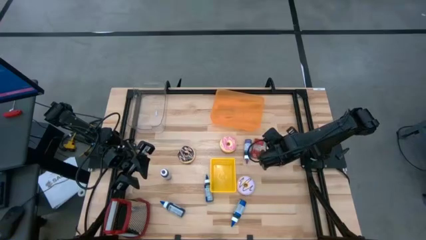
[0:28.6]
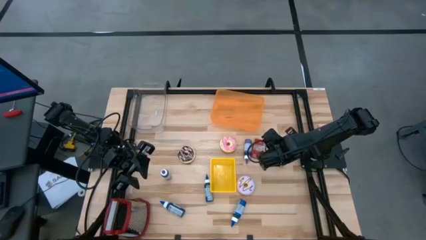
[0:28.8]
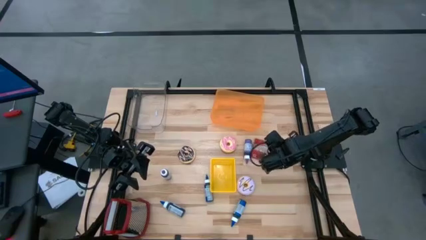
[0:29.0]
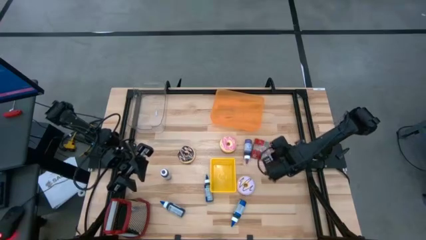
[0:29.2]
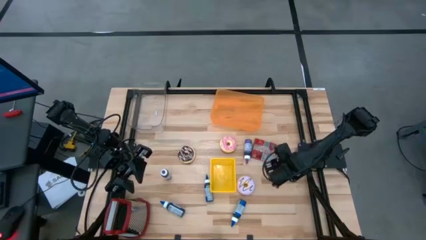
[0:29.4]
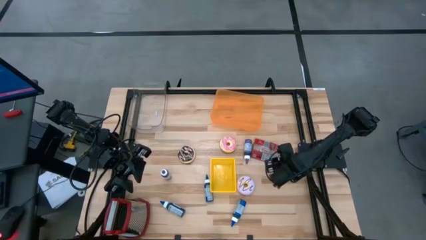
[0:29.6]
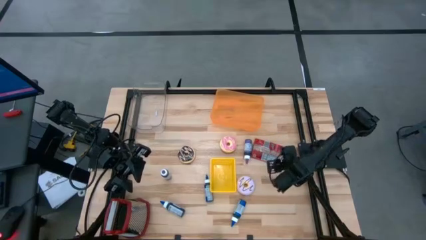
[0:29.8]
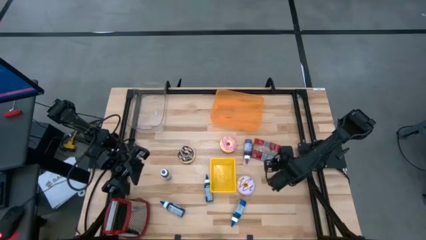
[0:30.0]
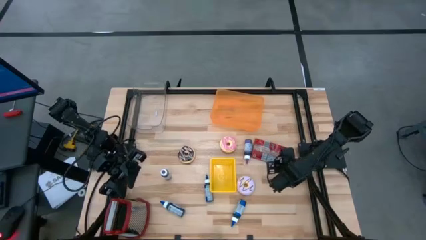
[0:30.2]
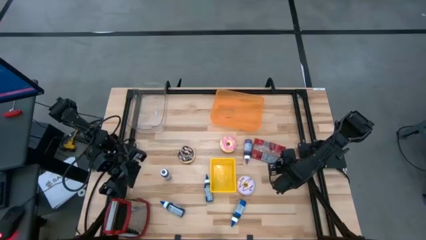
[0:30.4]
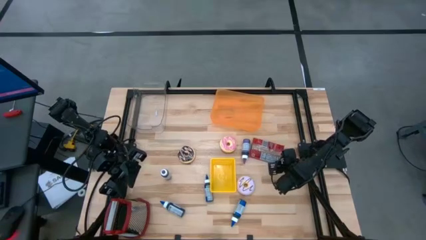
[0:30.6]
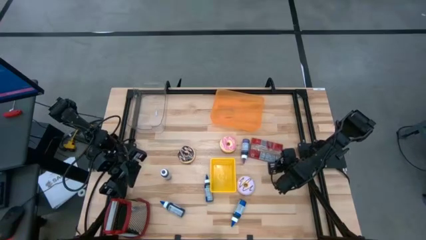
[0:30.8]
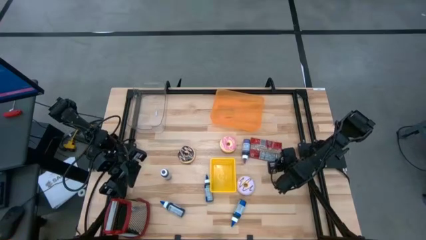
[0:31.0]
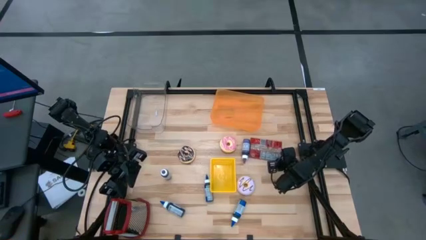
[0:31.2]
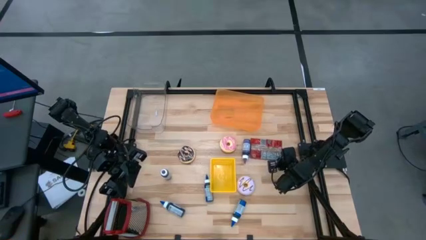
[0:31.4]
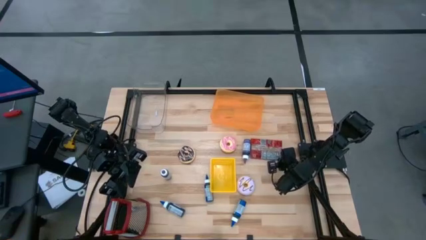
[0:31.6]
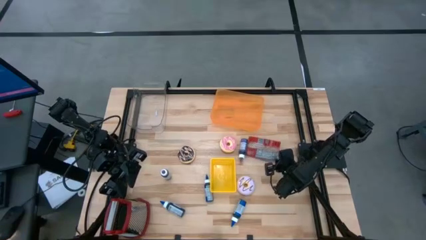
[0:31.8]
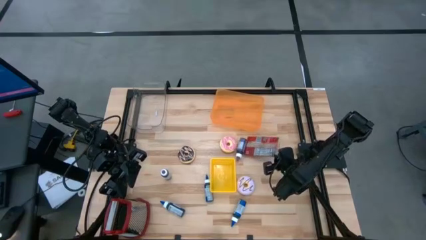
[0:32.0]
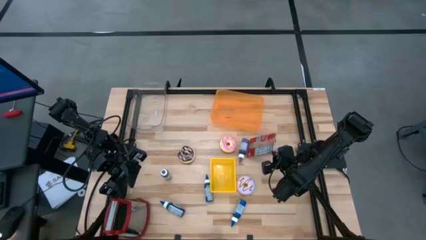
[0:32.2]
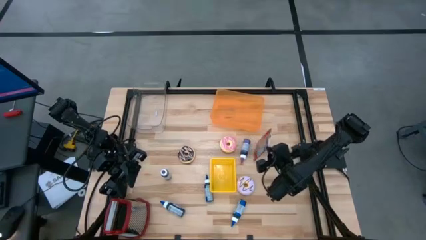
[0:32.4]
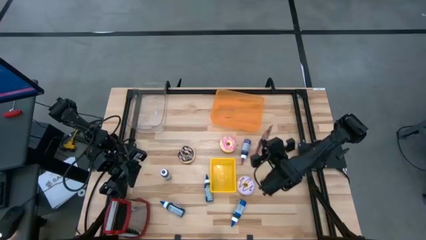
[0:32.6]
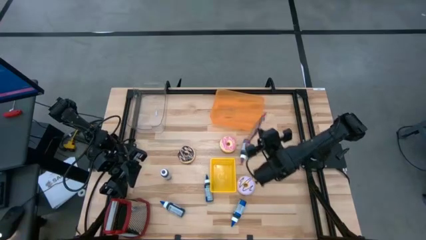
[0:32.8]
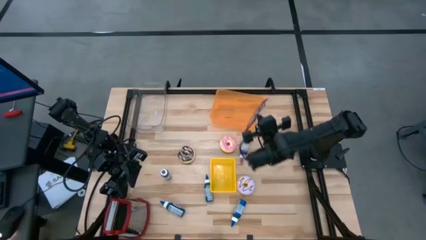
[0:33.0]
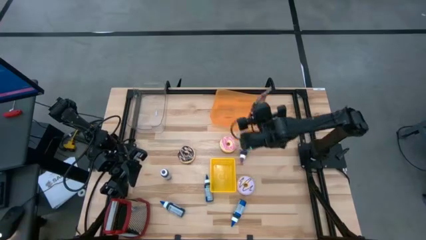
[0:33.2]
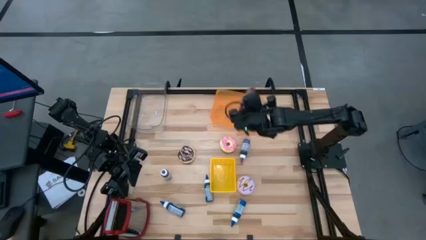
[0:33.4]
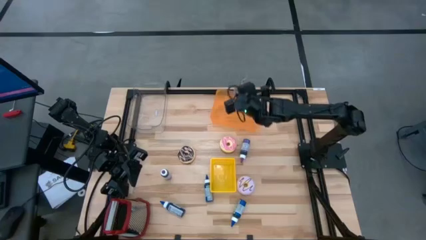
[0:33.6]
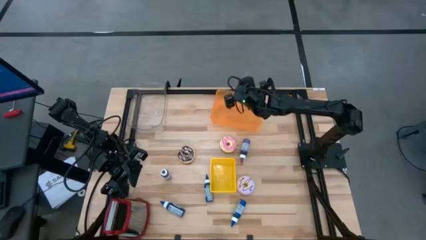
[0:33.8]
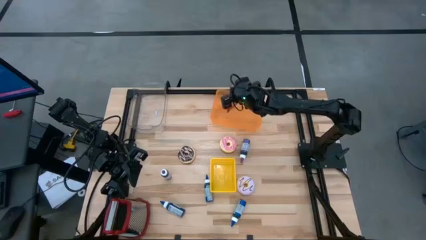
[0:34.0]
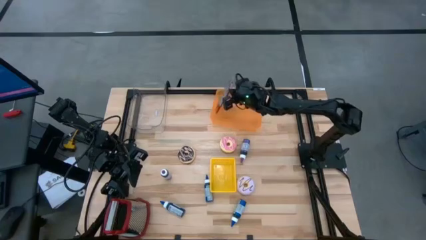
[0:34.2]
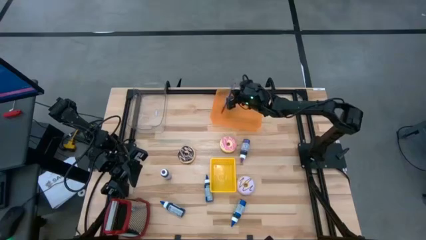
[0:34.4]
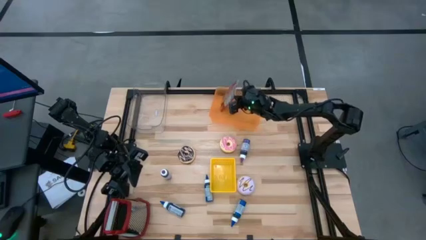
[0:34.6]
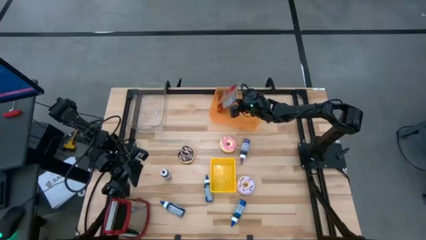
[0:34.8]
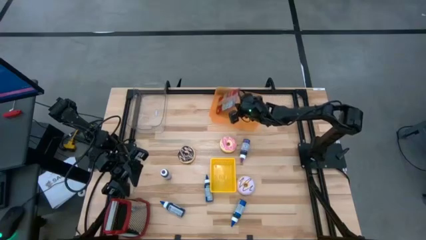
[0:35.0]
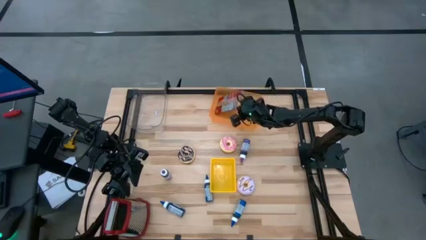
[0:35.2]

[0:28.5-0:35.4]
Put the red popcorn bag into the orange bin

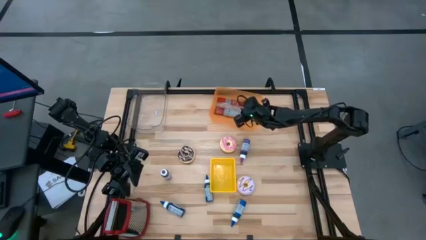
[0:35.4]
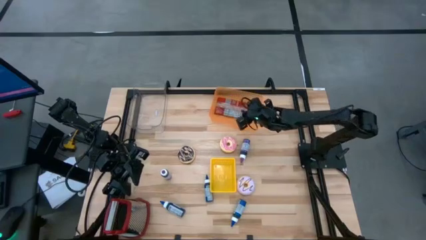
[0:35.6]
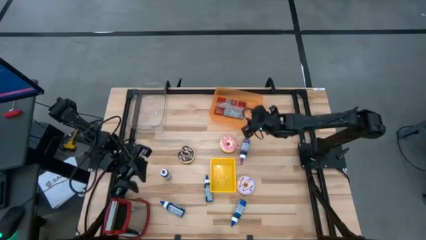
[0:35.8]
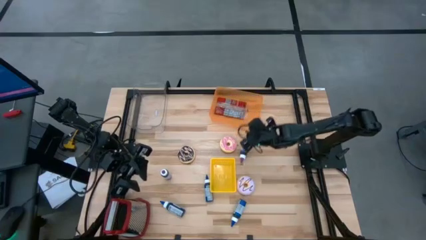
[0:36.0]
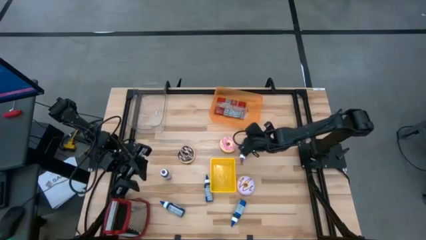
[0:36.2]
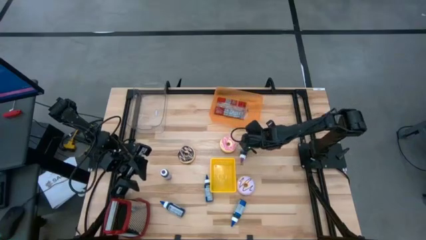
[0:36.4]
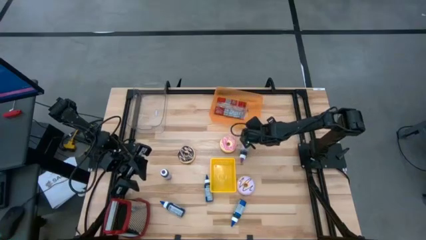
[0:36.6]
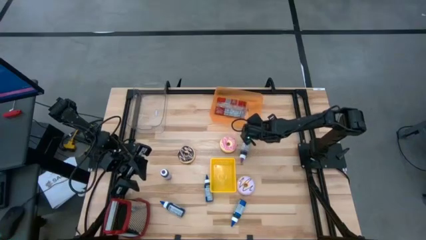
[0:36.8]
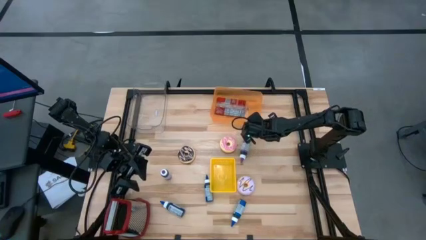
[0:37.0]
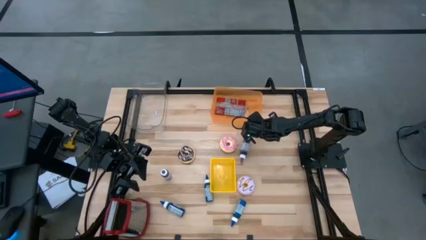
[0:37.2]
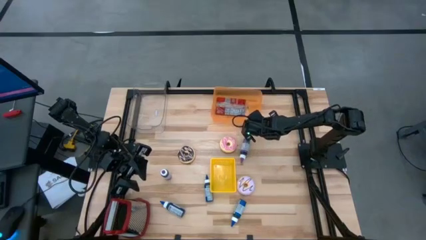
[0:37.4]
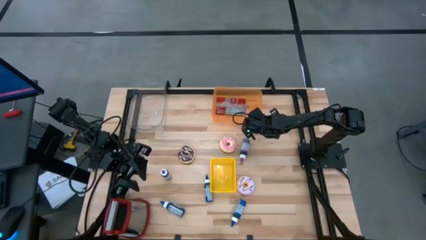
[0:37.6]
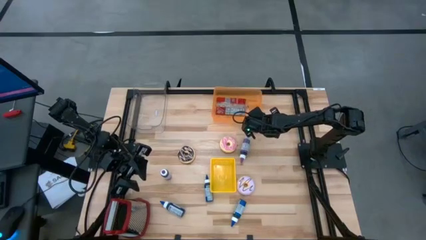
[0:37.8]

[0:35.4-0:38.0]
Adjust the orange bin
